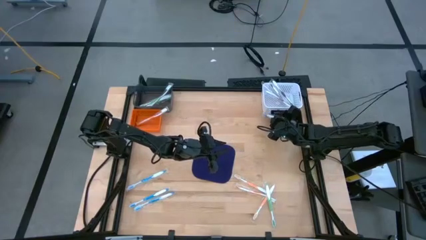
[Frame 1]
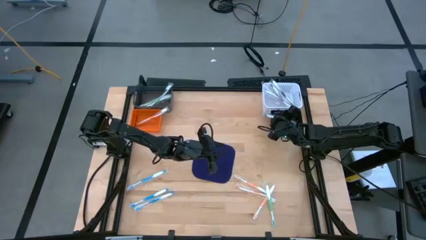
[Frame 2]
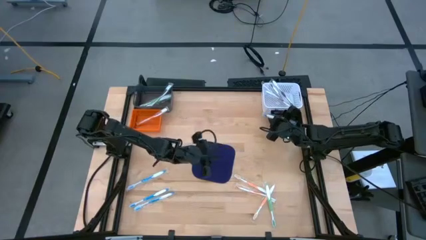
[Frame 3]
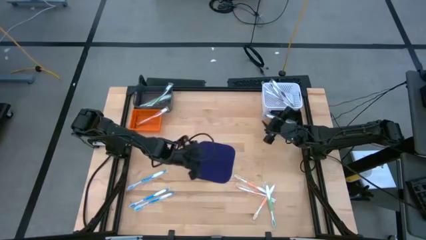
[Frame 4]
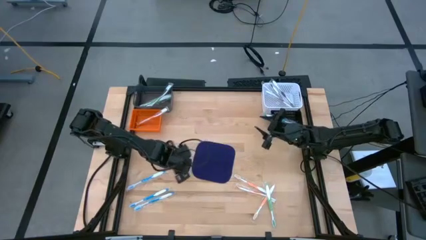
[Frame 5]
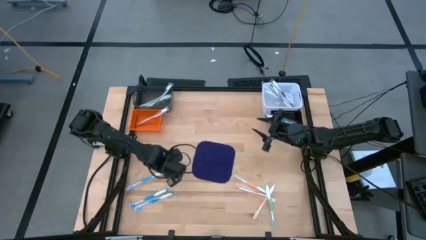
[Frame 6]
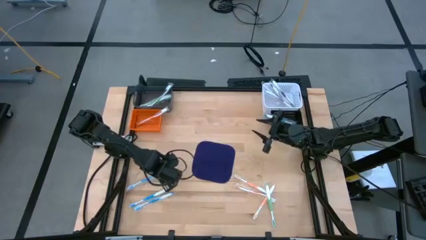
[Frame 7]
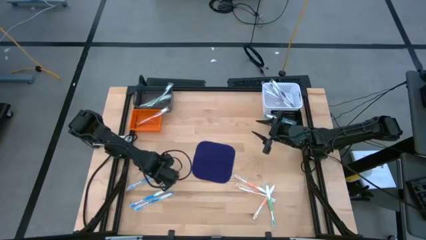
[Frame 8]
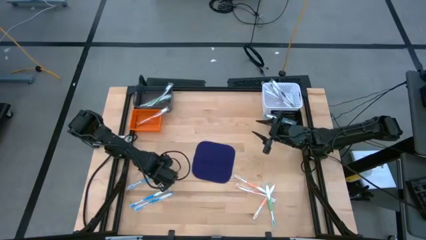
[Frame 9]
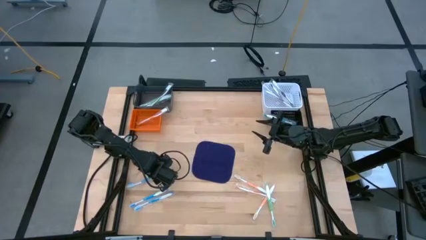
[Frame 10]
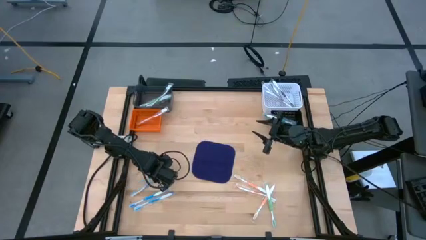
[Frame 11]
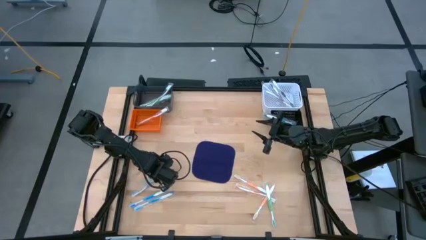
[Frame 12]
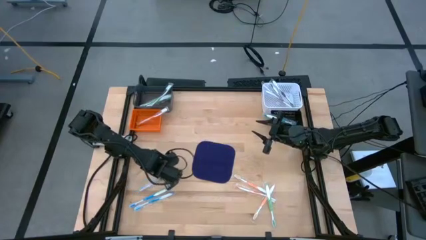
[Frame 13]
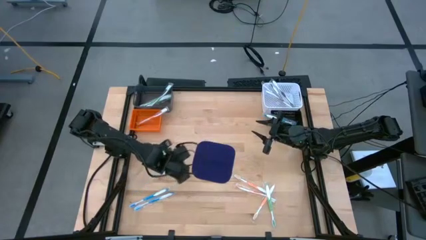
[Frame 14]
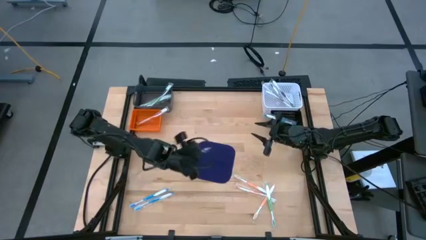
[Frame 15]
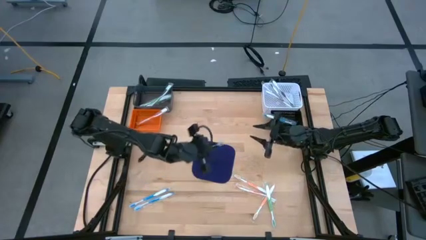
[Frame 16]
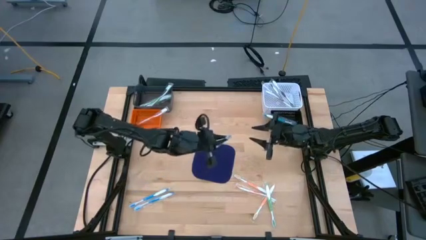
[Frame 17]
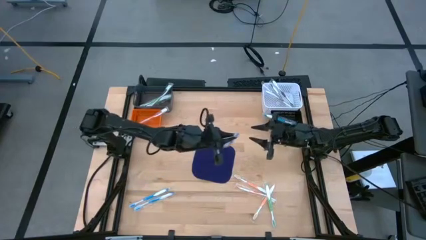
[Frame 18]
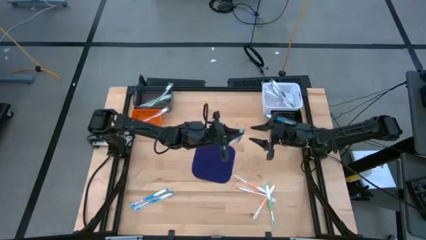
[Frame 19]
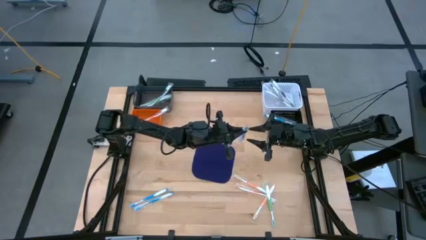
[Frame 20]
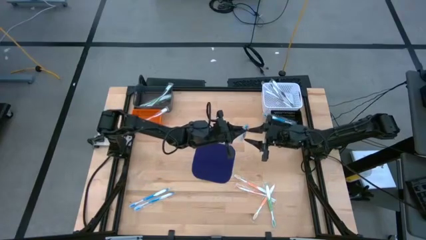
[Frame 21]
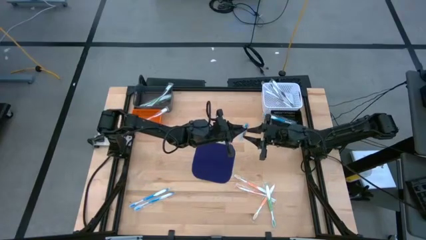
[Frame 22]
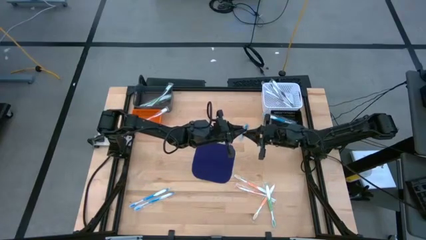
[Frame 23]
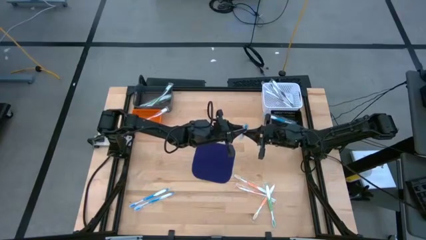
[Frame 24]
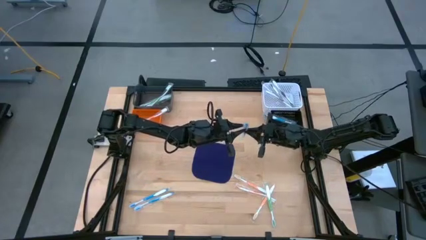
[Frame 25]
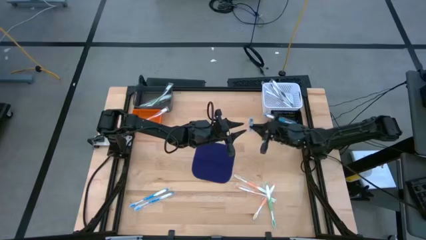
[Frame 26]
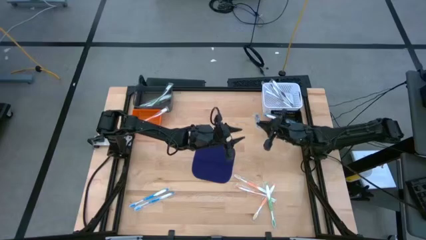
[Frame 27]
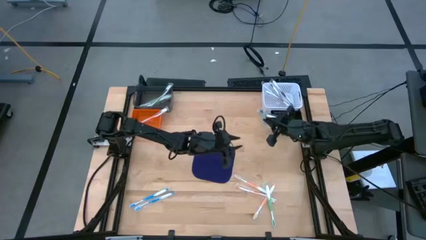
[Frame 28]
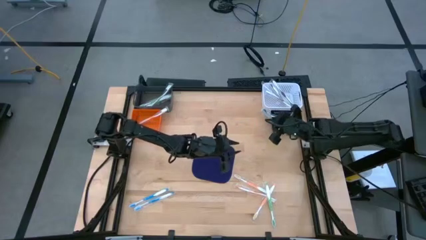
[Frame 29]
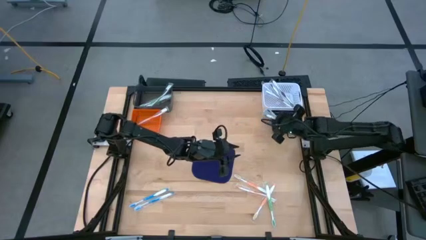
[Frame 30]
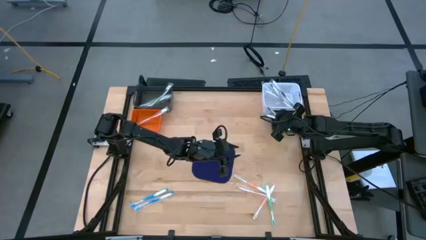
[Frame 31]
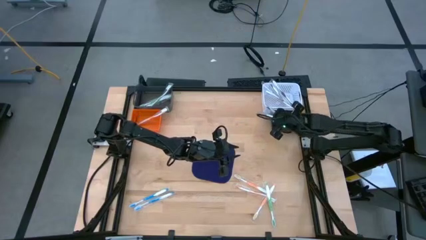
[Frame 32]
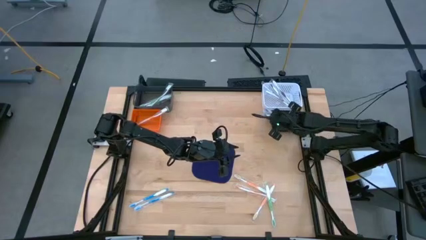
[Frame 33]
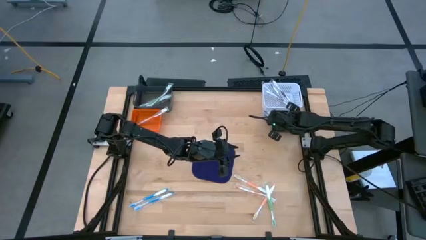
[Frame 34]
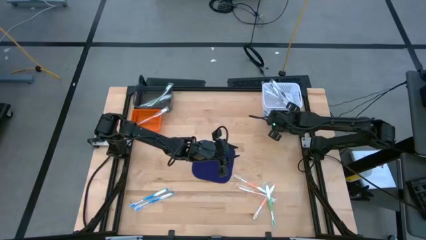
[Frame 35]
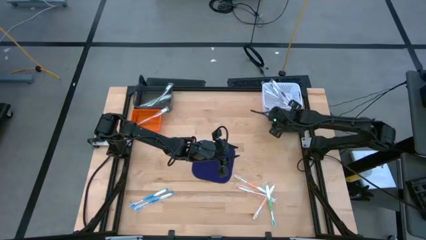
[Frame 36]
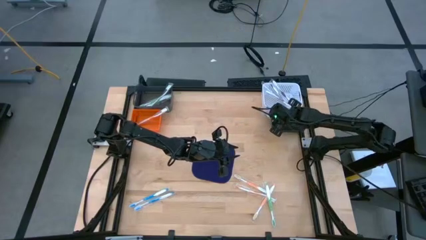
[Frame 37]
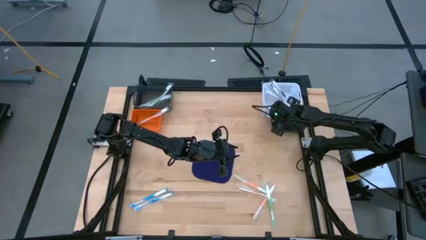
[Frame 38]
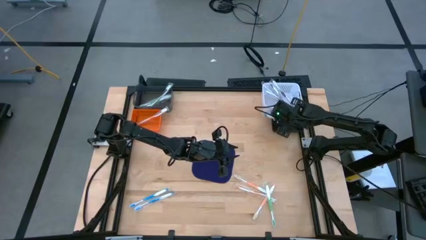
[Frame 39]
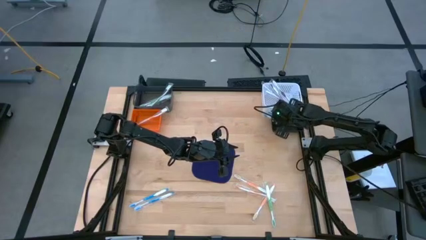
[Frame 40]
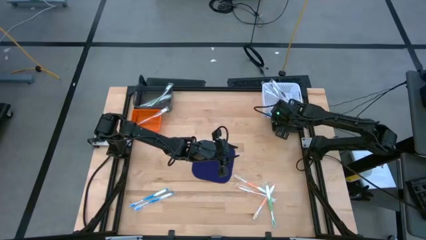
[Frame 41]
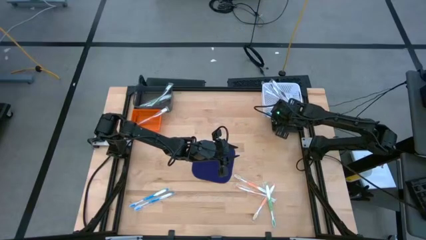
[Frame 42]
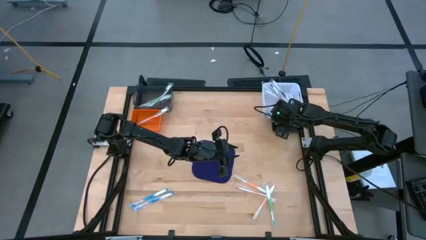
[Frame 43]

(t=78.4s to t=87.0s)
Task: Pick & Place Toothbrushes
Put the blue toothbrush into the black bin

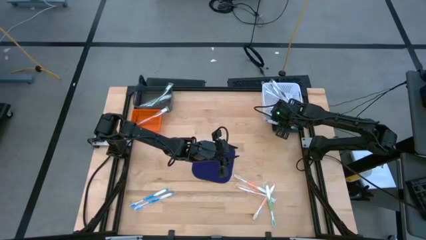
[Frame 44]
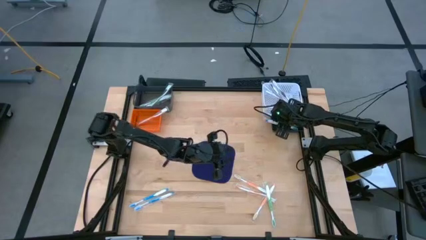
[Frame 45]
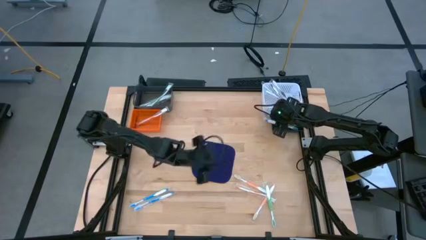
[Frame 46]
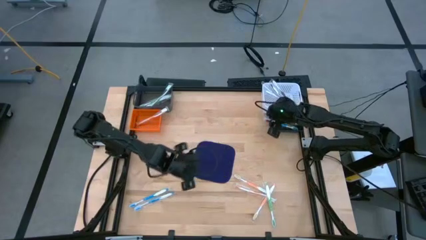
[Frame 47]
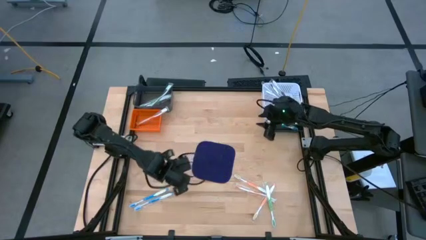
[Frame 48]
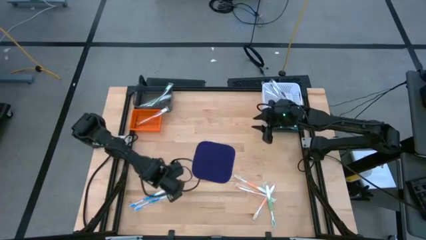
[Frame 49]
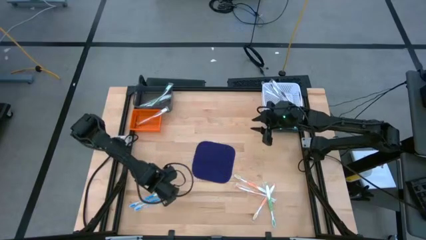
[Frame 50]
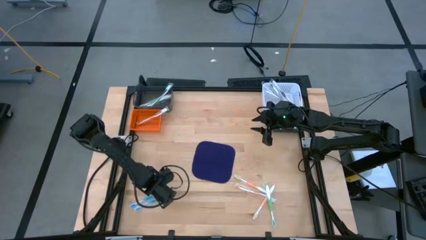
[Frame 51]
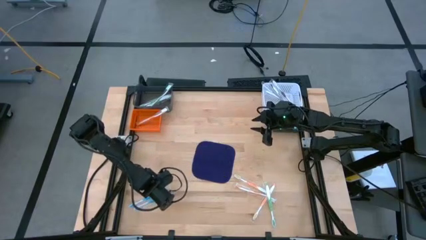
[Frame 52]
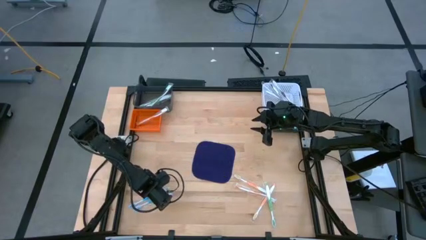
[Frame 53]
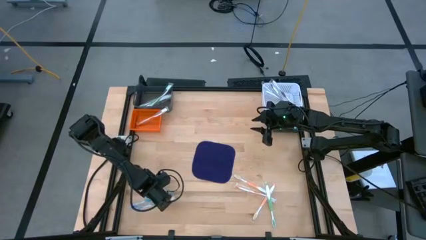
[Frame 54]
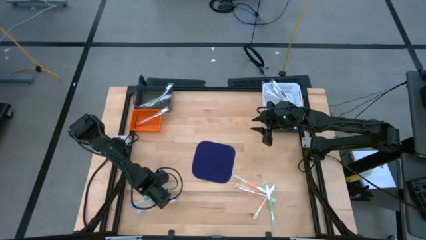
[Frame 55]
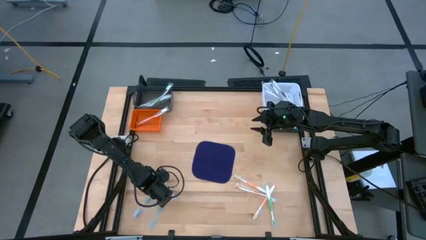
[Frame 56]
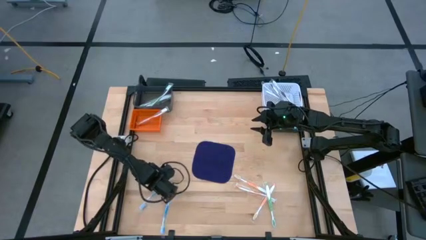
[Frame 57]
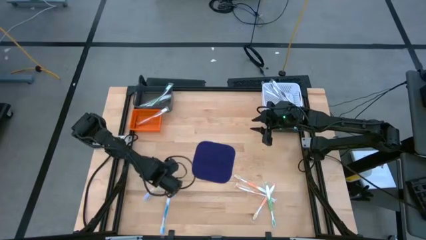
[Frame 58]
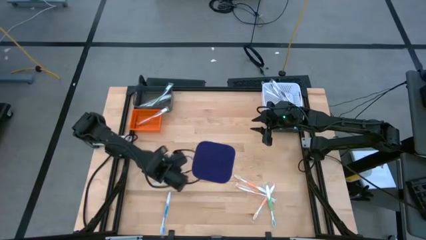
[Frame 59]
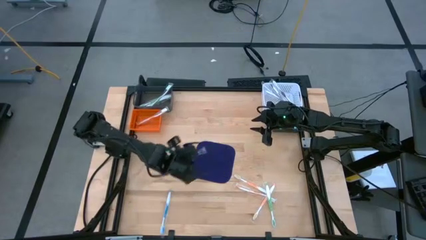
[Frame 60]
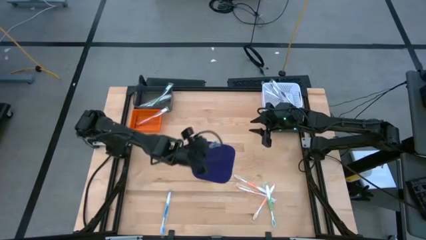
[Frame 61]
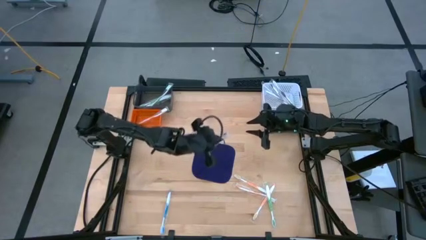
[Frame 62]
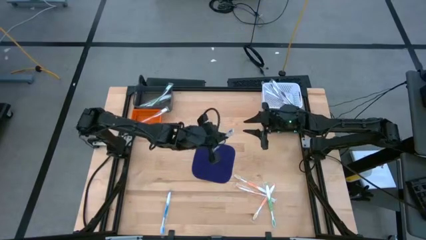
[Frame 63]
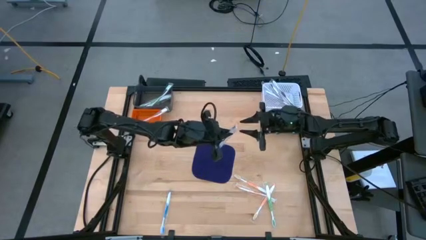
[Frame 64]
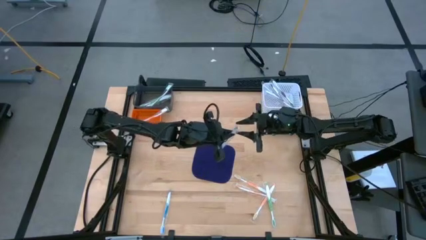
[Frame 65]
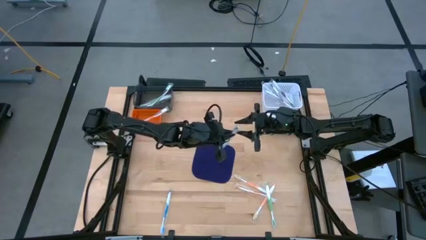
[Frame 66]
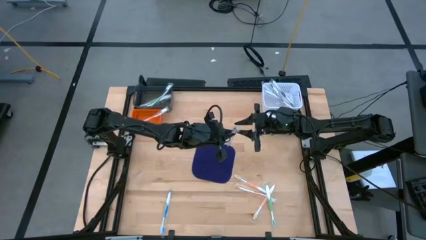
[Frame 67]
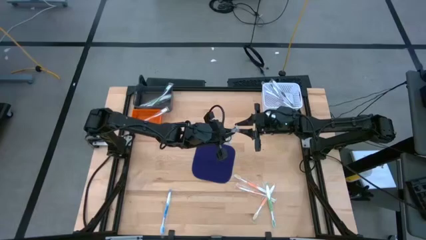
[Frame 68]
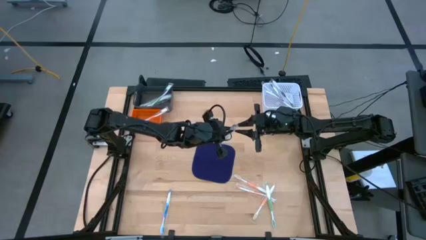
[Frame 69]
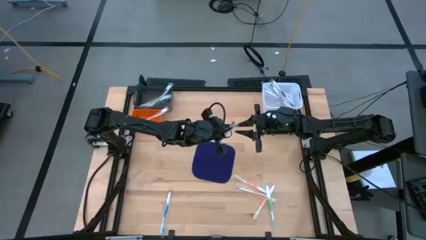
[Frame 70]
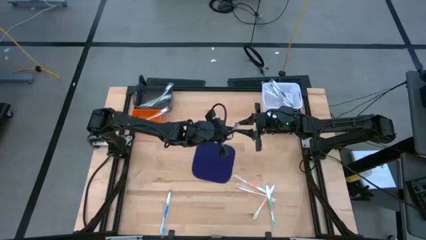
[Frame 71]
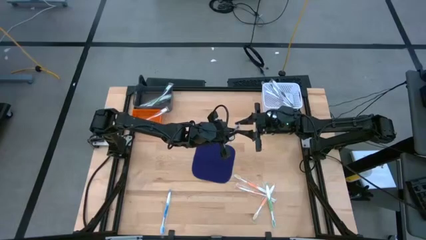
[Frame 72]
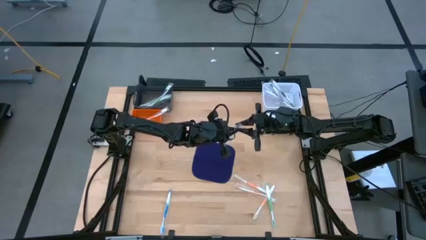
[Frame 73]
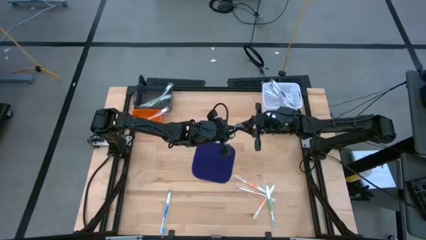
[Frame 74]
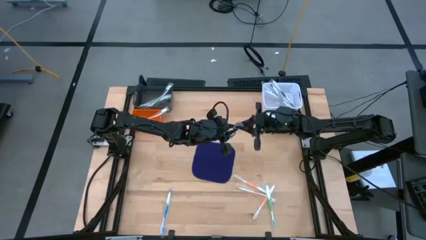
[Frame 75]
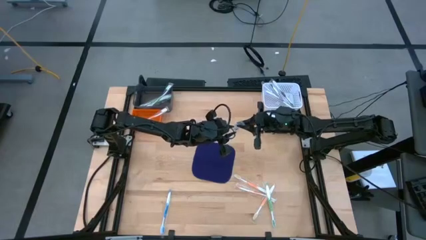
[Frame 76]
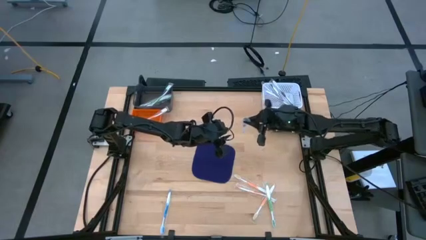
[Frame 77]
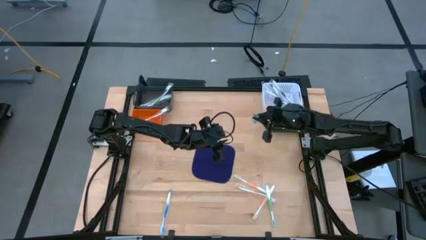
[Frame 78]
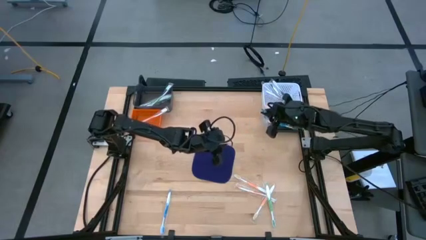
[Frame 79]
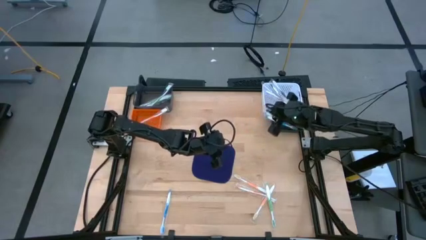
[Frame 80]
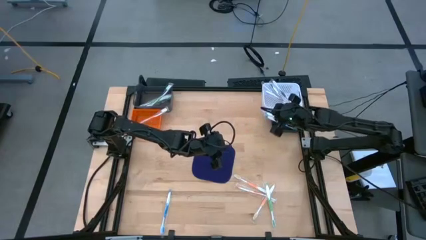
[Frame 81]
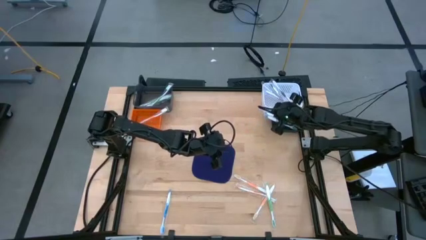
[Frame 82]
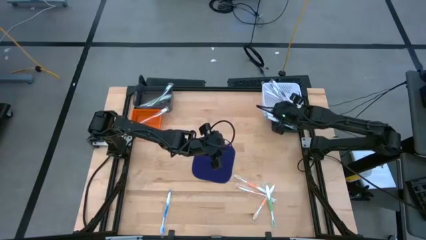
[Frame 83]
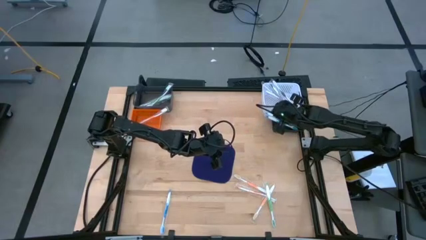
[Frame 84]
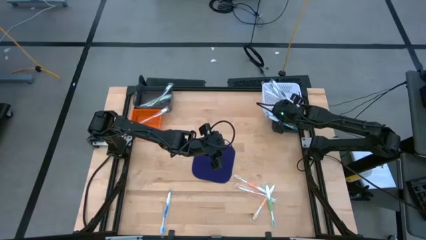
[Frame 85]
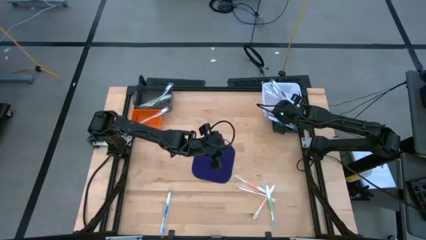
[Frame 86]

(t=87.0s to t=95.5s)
Put the blue toothbrush into the black bin
